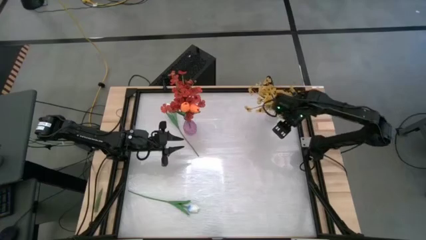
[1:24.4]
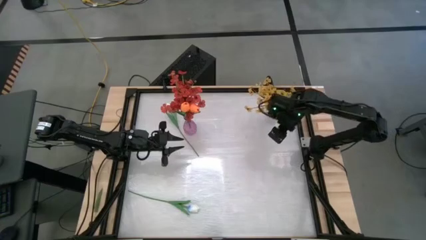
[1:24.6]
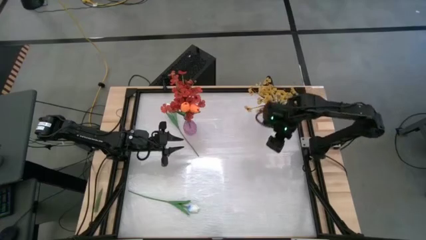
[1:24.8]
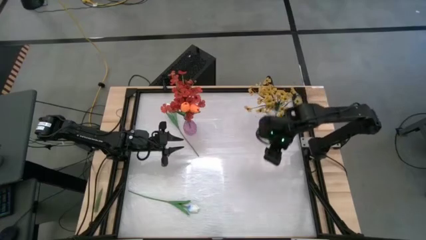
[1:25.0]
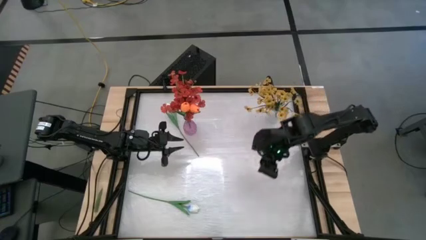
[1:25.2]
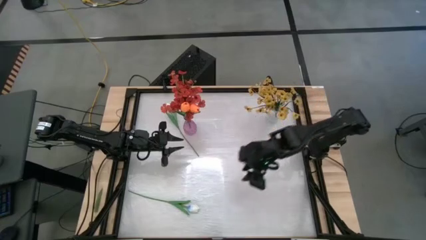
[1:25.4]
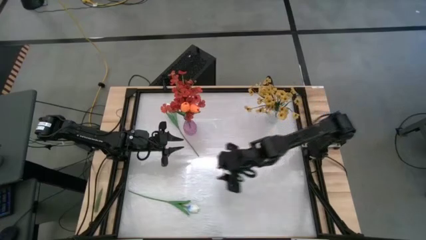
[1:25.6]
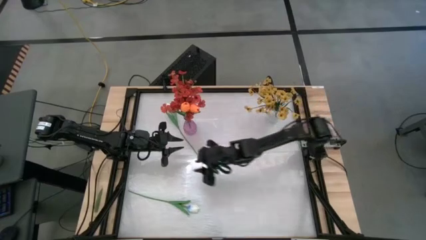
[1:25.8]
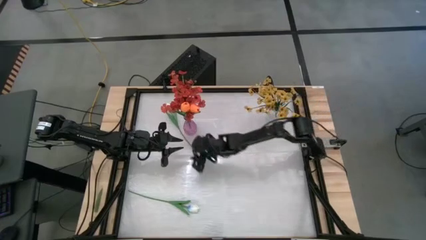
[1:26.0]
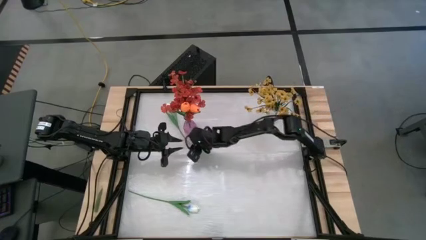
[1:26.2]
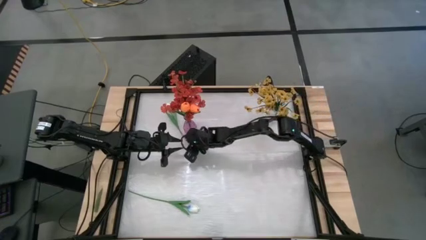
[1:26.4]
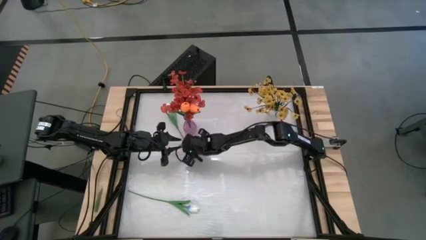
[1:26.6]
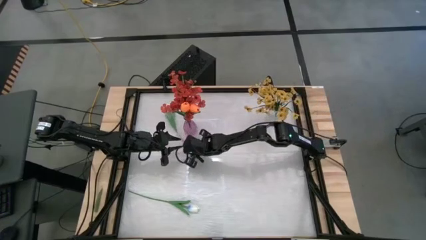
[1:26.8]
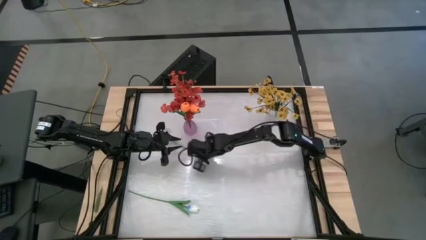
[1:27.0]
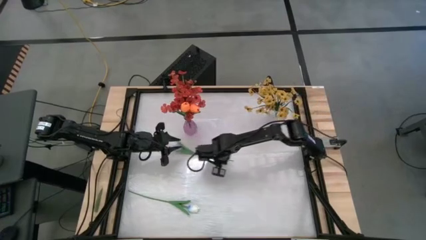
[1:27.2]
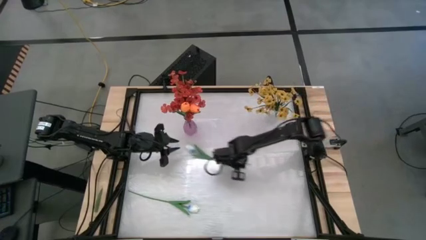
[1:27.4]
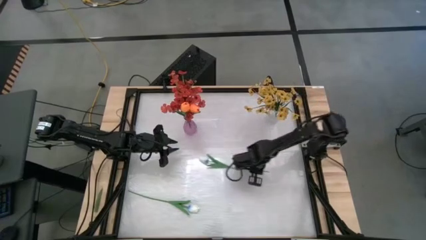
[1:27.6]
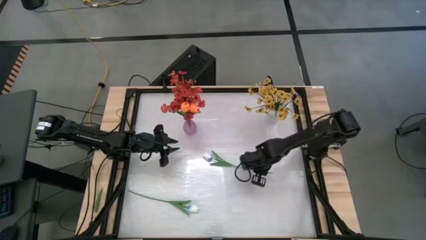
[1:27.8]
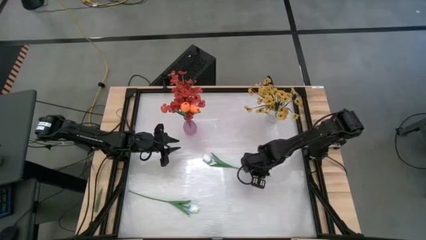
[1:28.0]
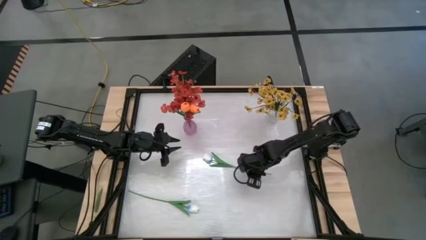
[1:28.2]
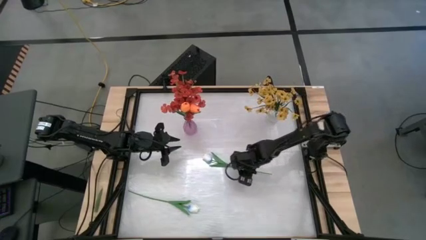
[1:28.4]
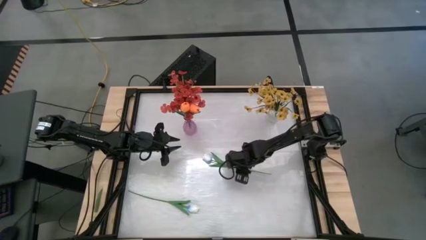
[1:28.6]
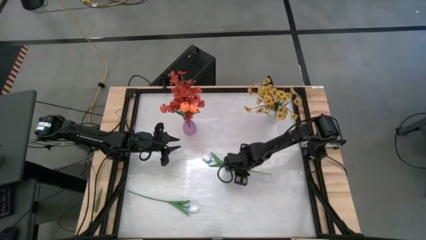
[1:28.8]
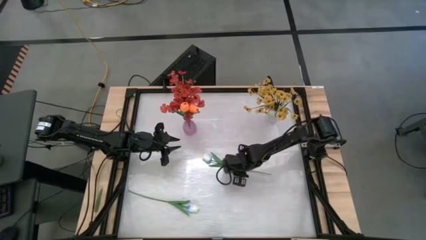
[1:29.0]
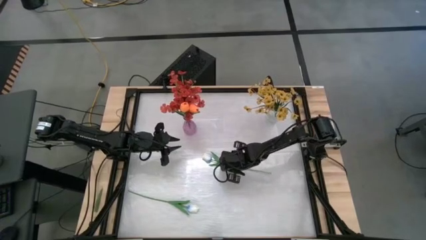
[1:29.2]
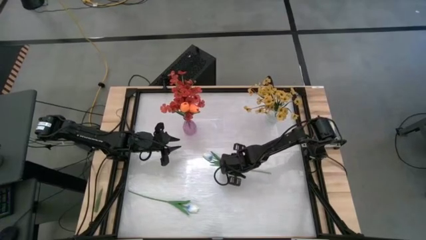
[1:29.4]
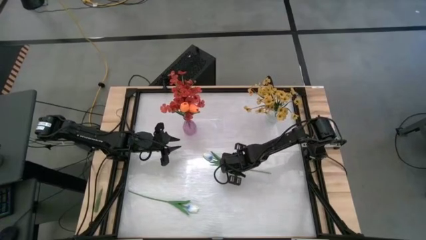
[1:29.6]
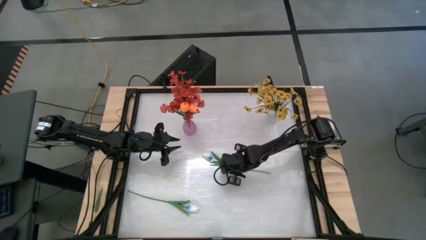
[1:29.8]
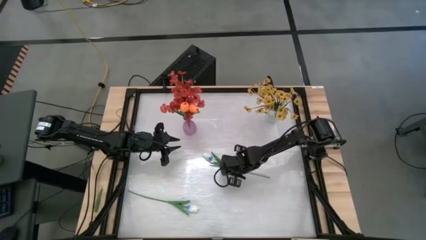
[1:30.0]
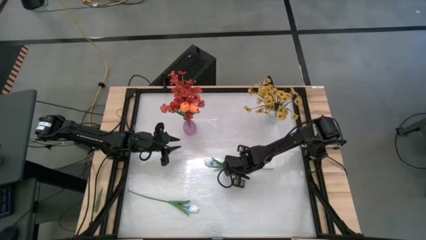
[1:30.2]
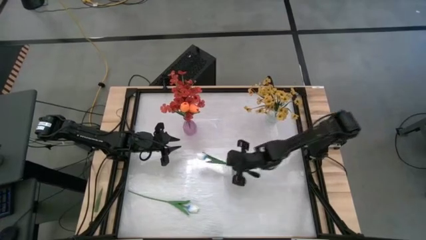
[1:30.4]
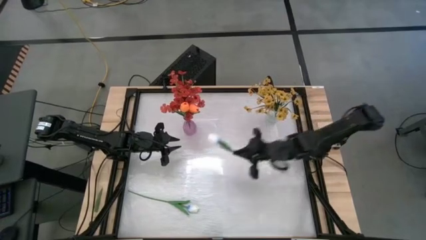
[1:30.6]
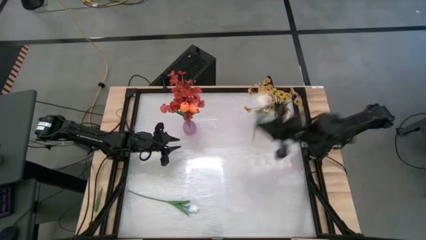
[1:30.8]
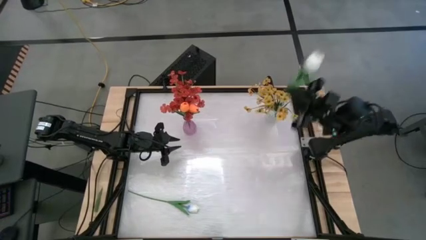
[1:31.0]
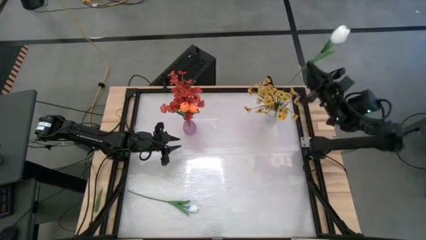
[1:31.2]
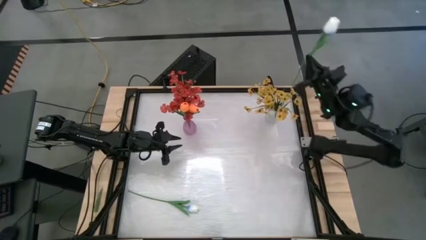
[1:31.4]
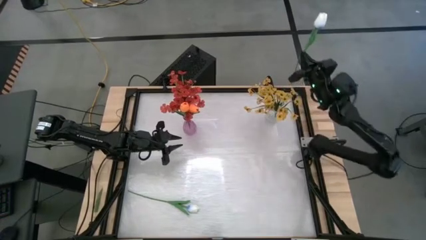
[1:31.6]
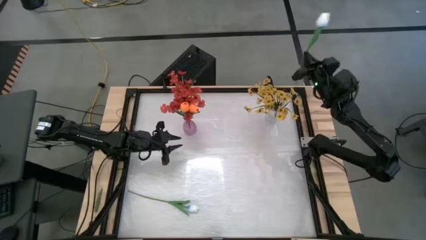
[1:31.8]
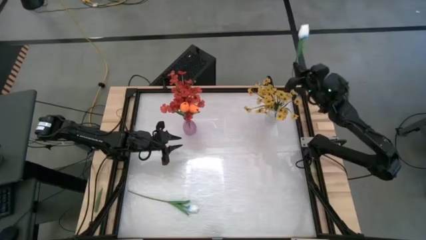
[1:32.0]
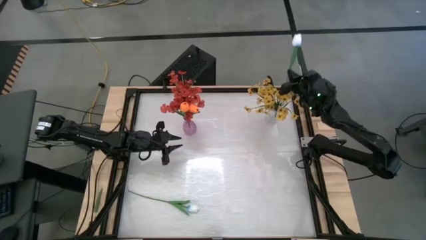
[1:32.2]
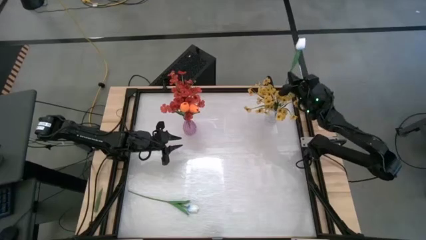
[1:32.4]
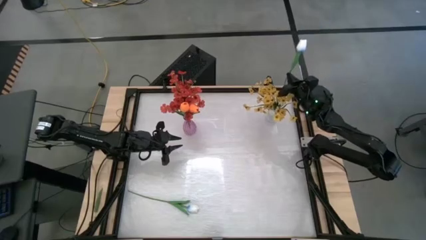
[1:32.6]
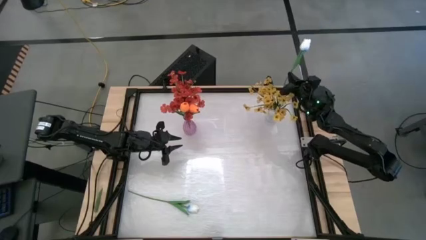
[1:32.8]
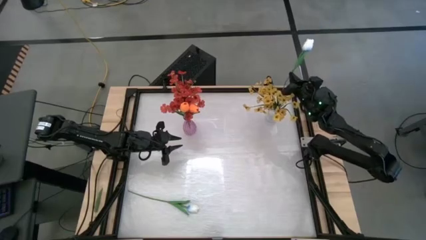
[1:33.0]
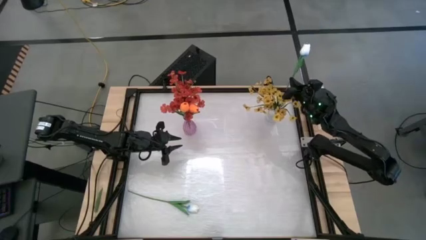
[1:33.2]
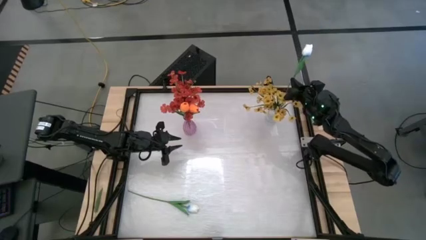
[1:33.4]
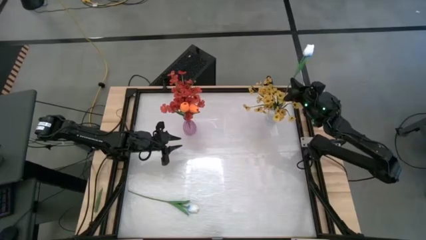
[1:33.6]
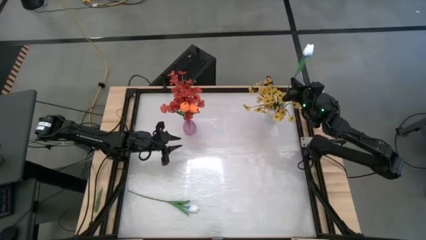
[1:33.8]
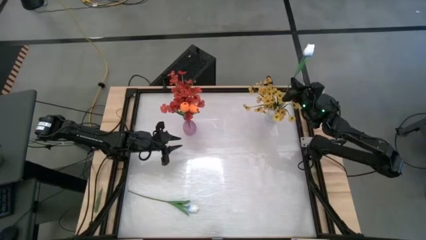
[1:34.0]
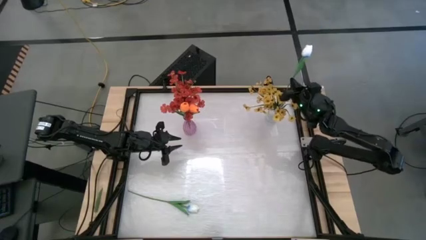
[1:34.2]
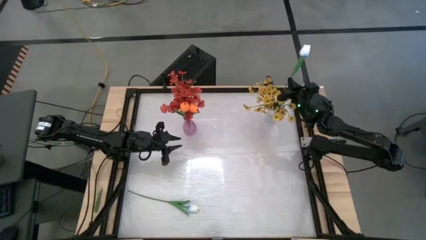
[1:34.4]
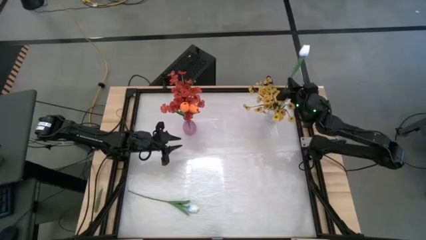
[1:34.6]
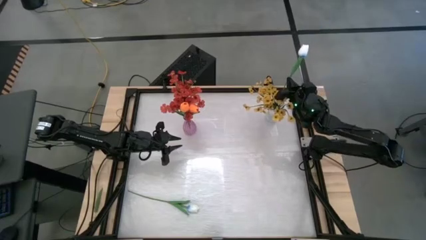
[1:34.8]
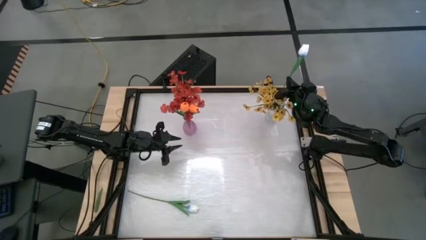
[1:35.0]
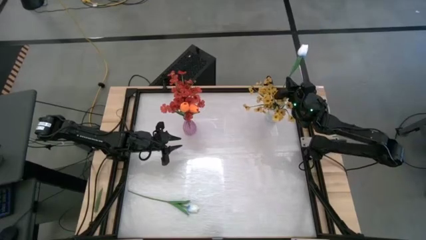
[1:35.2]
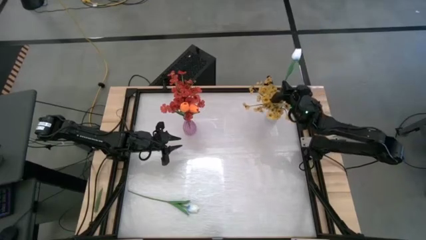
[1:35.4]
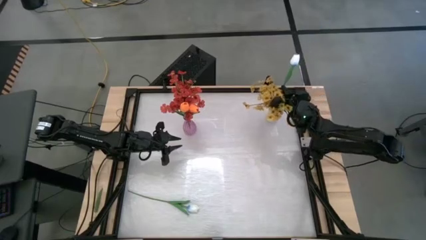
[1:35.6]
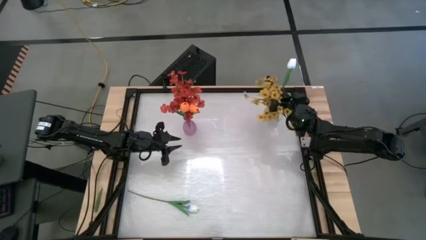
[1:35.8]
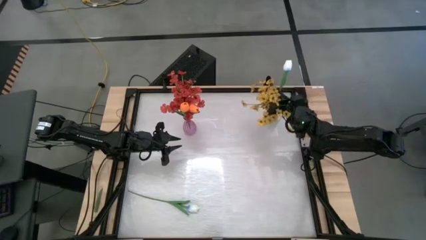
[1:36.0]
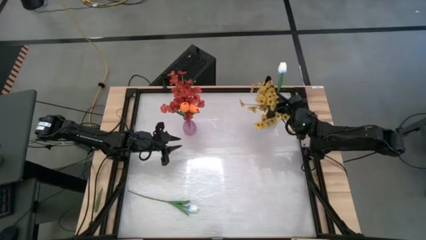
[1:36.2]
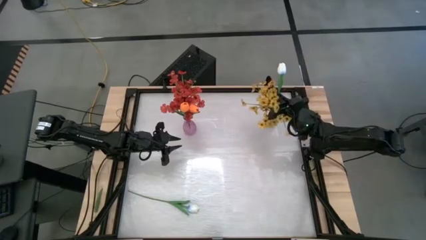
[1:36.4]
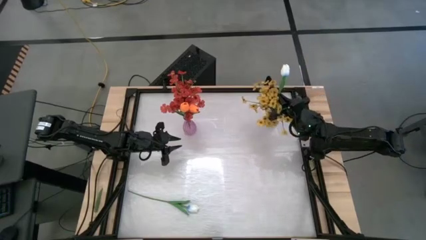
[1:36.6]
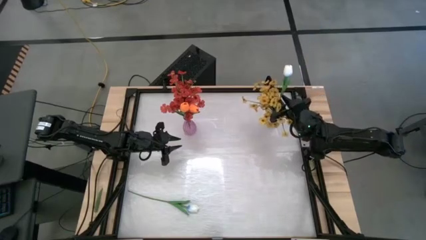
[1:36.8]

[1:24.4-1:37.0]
Task: Sort flowers into vase by color
Put the top white tulip into the transparent vase

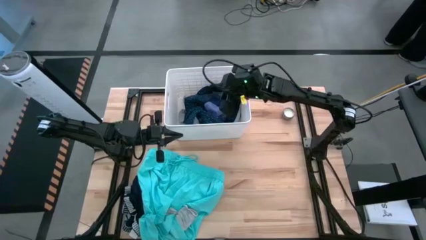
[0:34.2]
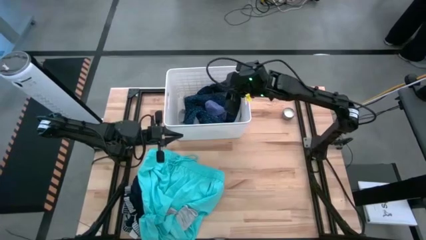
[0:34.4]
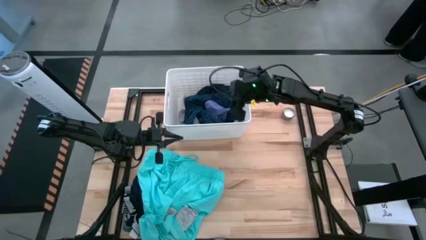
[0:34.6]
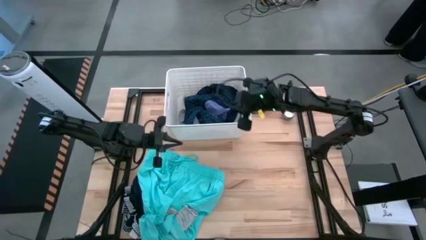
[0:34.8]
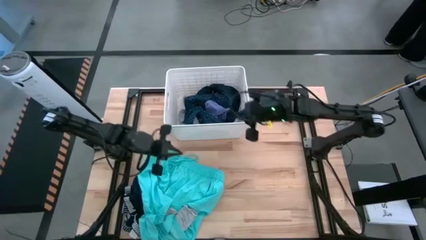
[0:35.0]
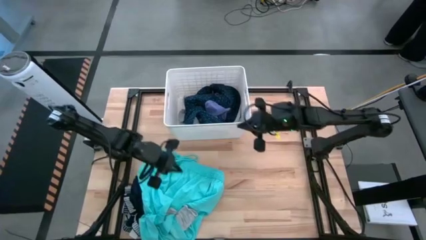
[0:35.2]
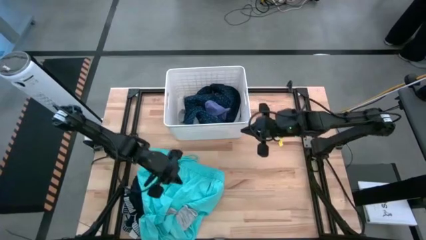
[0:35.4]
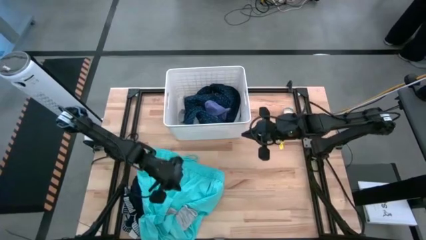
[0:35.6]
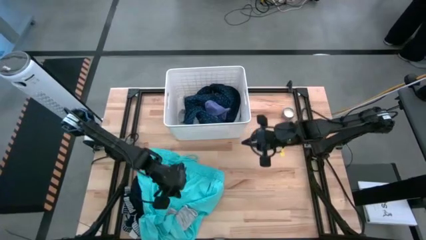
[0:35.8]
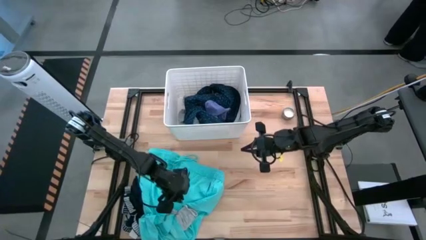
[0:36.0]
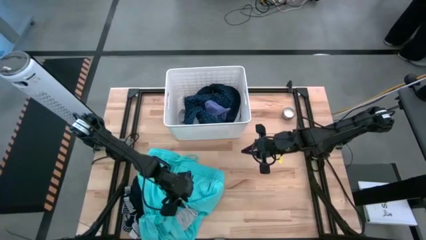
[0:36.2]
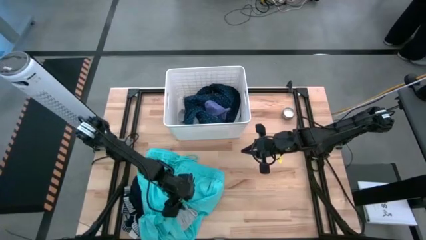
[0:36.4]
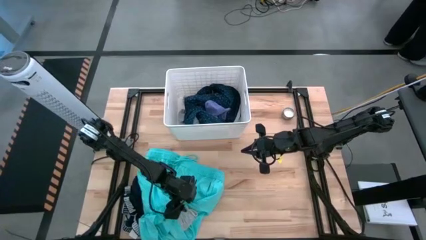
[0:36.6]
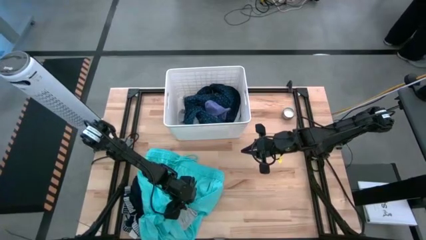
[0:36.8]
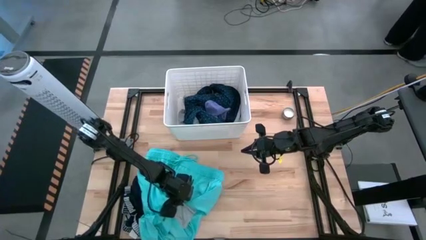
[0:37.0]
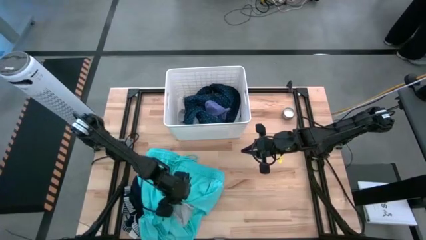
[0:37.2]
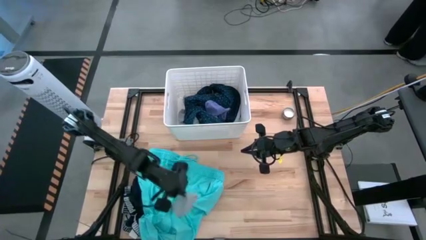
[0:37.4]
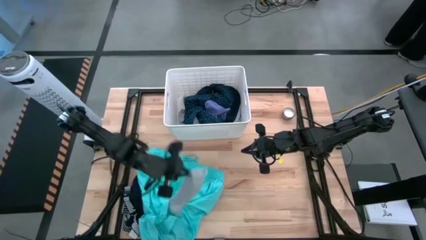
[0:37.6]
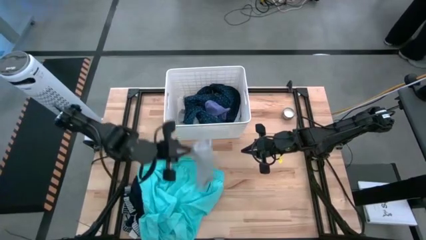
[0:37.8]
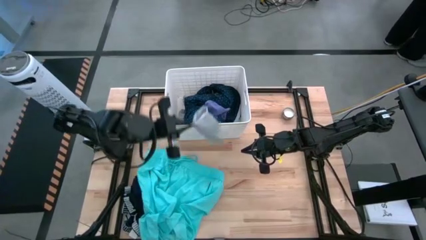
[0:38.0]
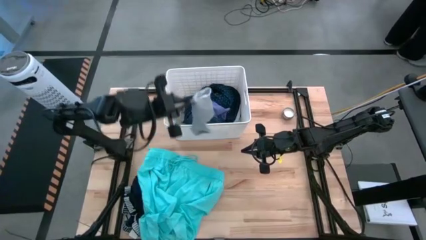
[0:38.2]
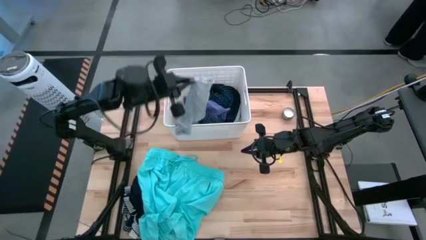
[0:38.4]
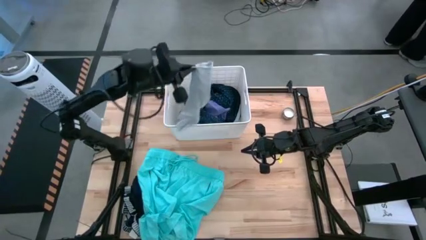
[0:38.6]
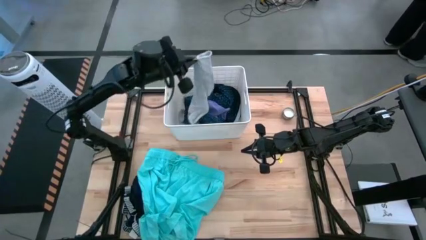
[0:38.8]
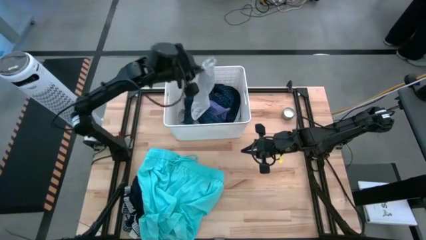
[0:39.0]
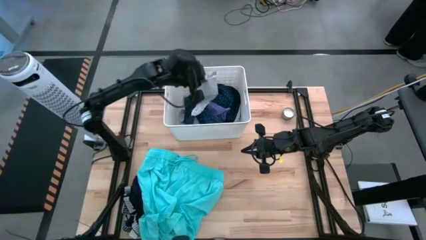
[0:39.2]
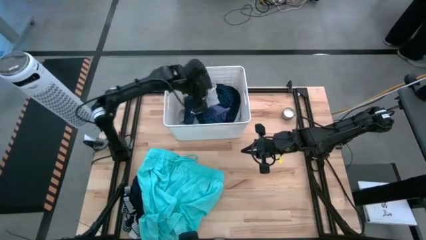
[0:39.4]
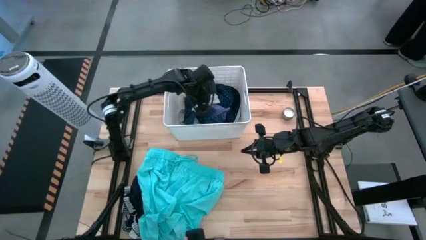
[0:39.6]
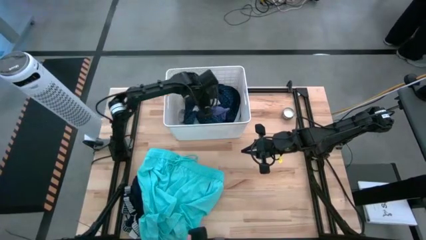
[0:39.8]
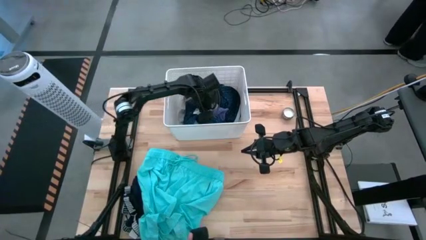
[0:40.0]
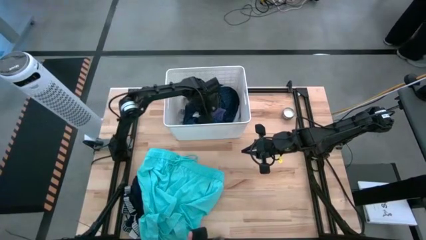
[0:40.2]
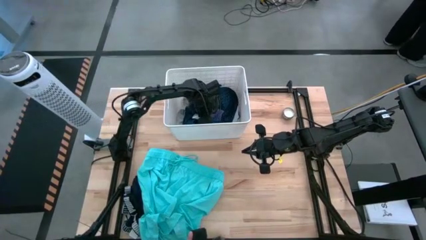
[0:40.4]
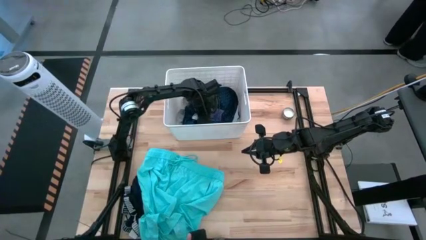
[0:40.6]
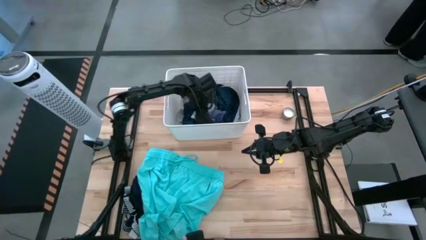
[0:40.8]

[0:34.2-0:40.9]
Task: Sort clothes
Put the gray sock into the white bin
